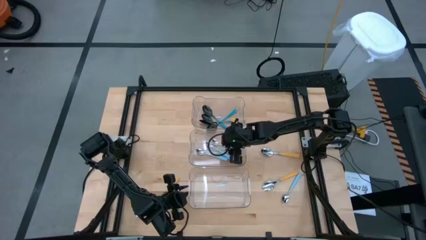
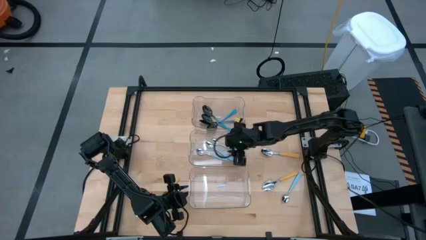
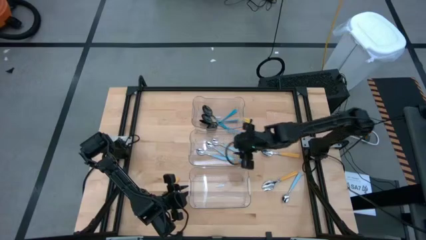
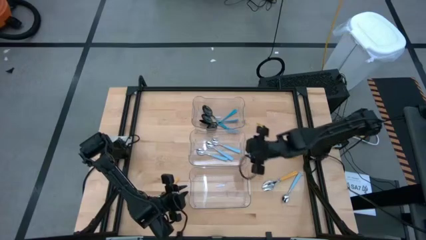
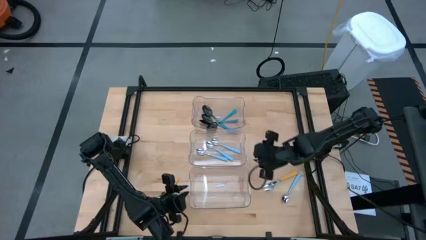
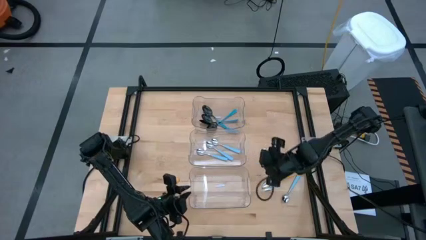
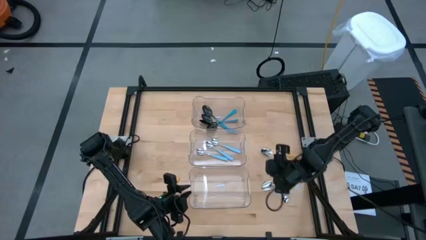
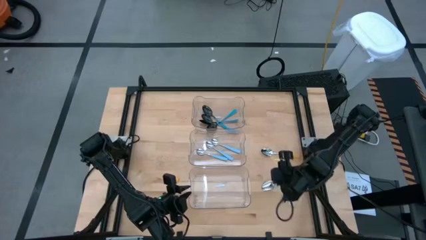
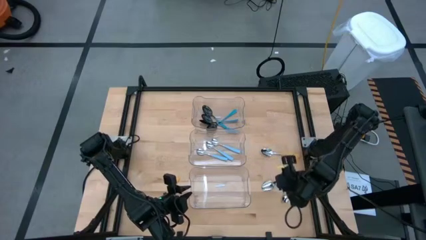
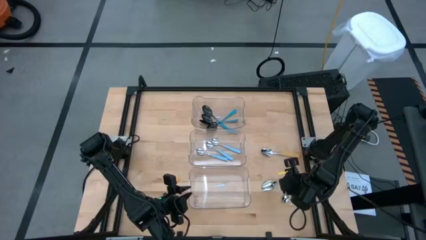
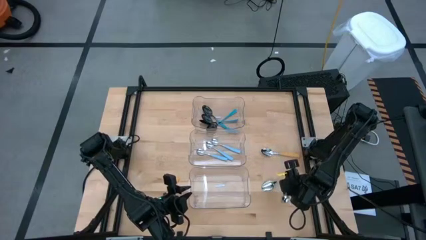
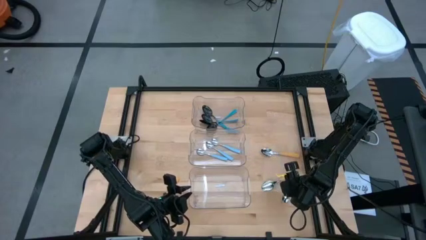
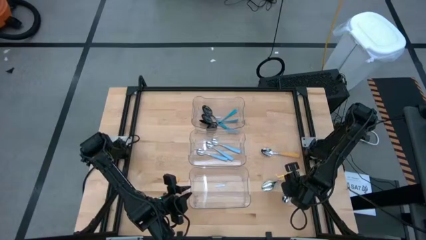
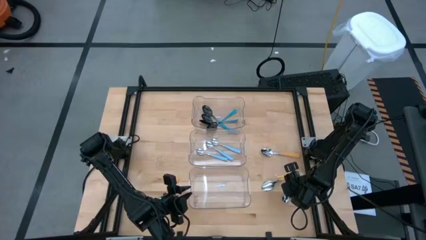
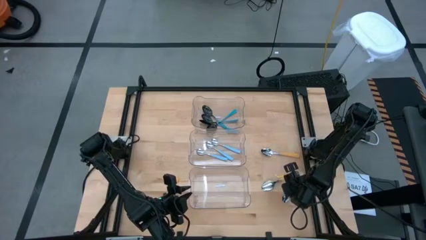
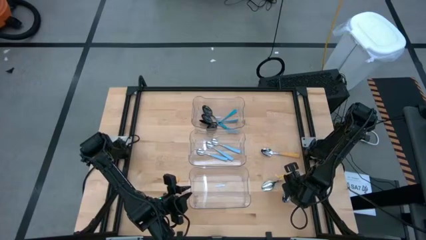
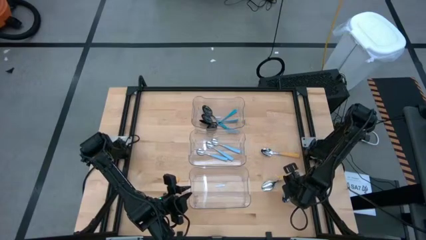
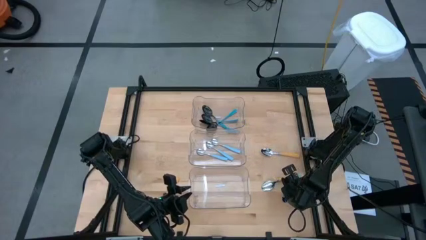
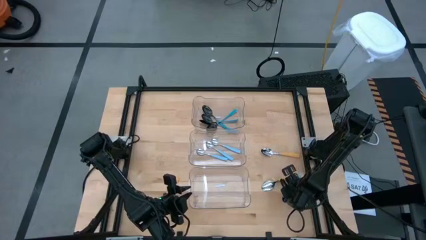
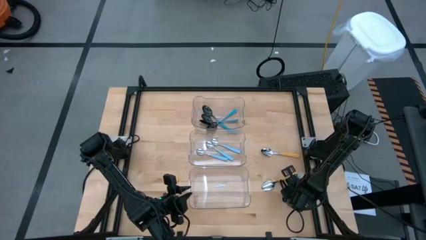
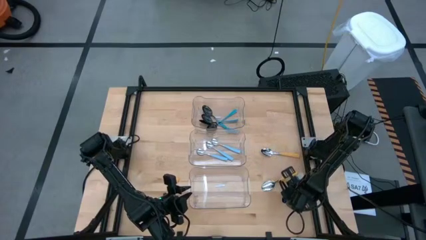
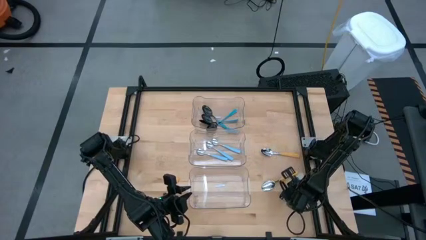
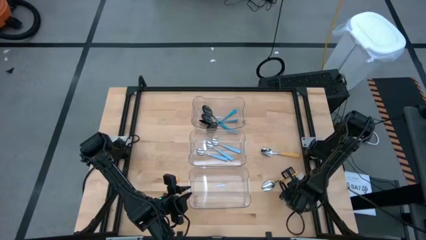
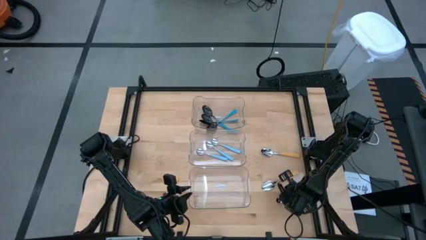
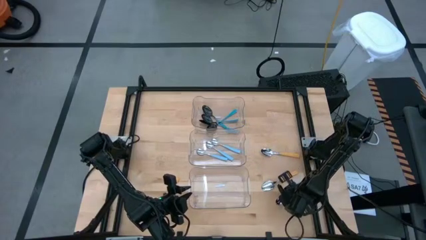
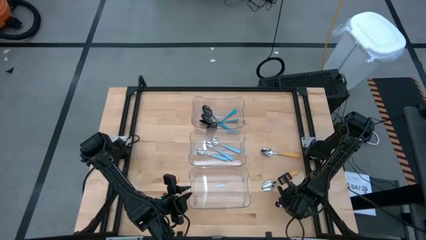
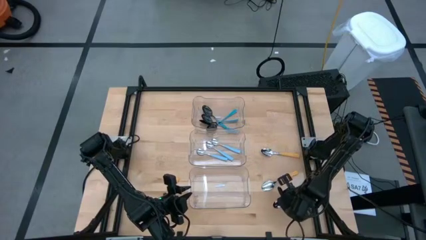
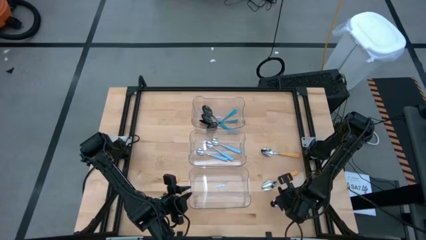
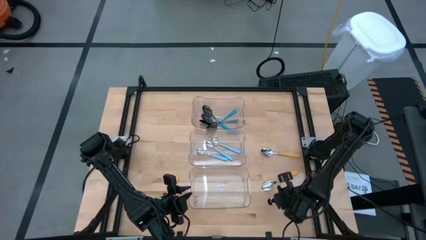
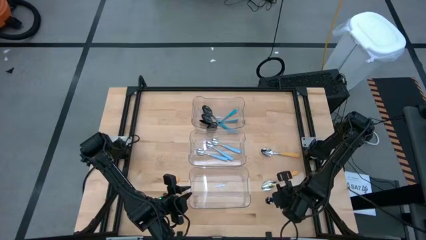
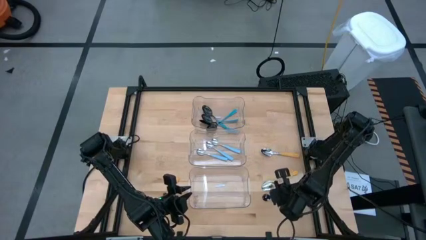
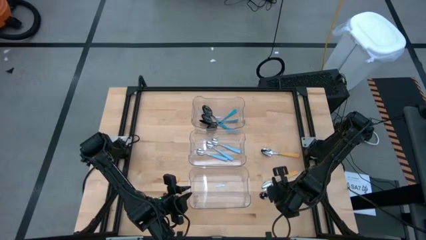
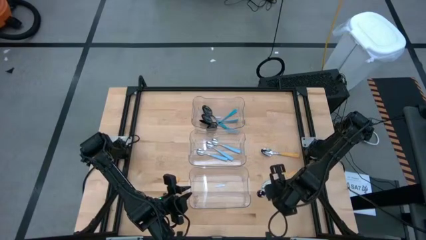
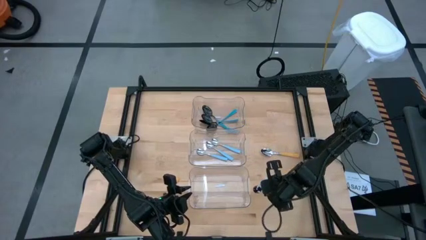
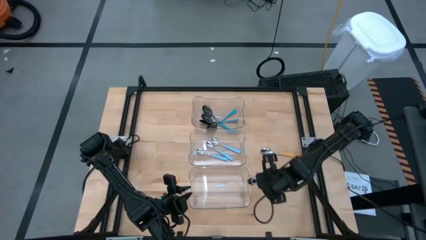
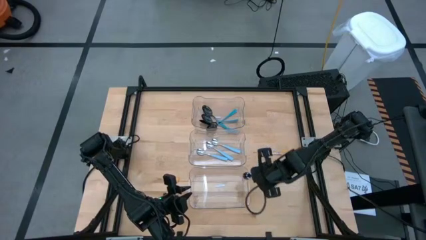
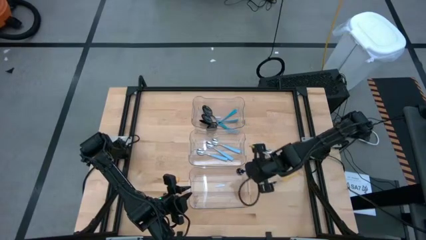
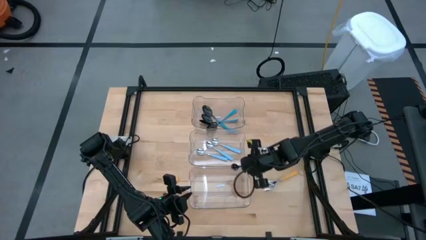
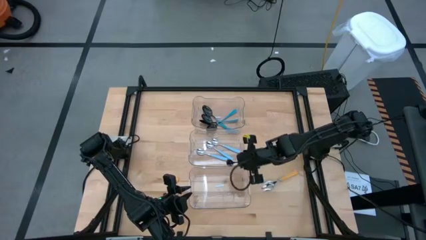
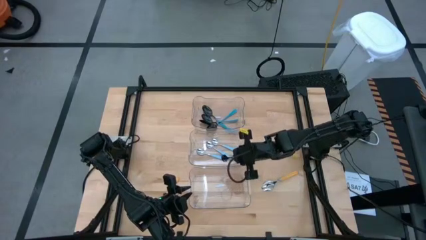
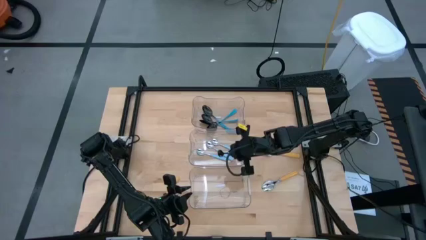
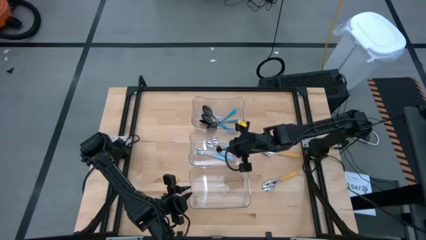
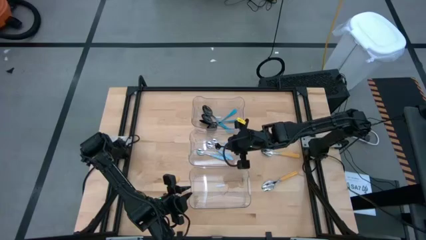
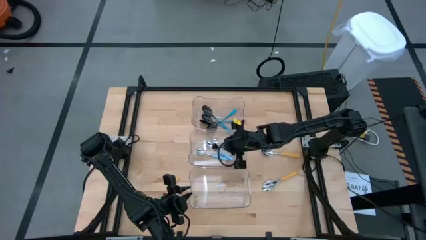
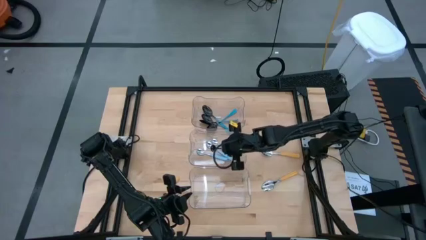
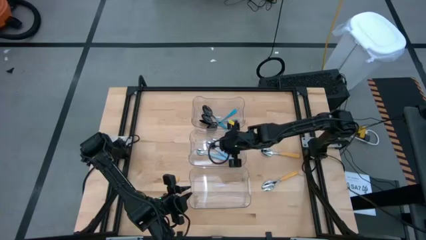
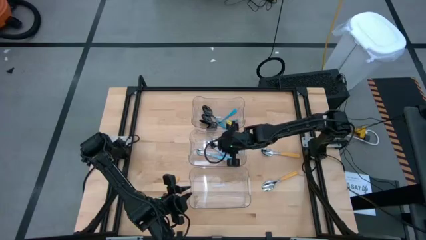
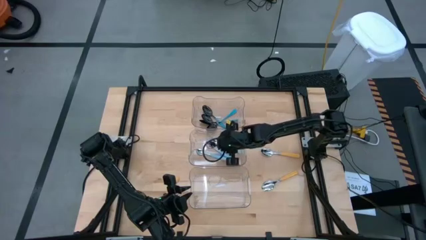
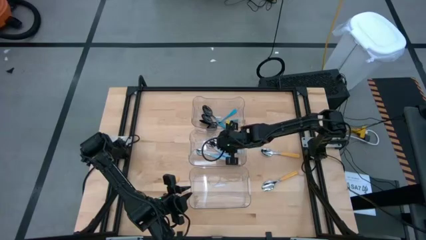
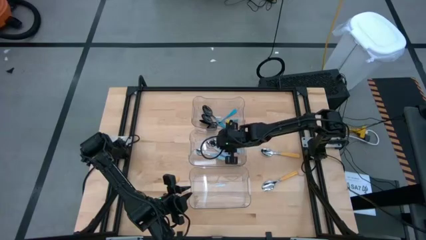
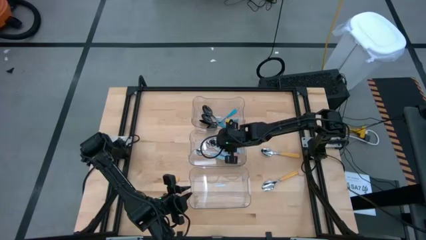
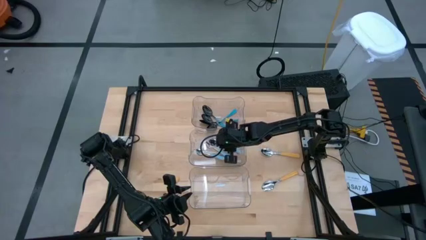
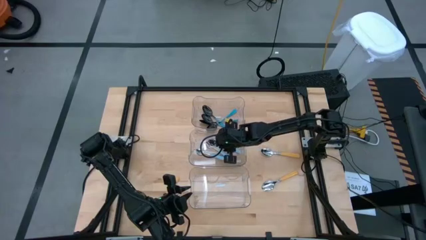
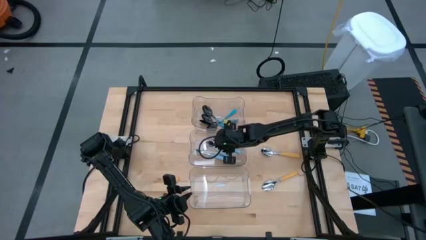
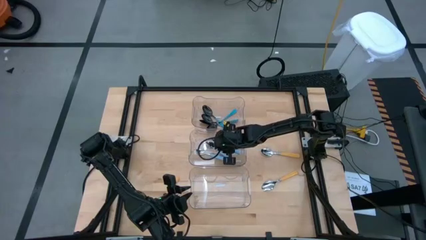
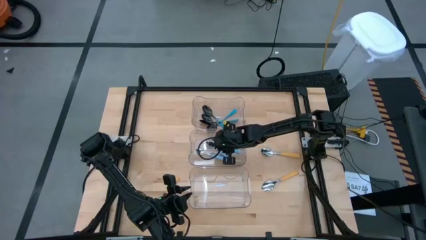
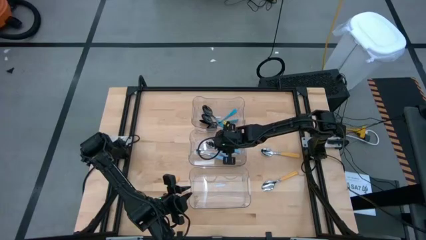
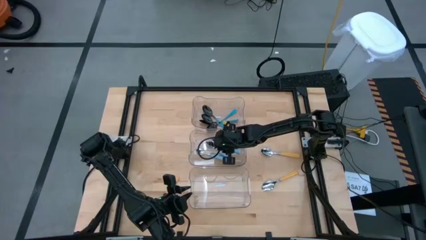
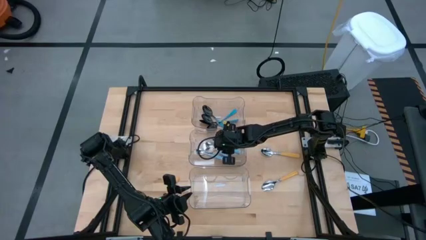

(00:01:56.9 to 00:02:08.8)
Task: Sort silverware by color (type)
Put the light blue spoon into the middle transparent bin

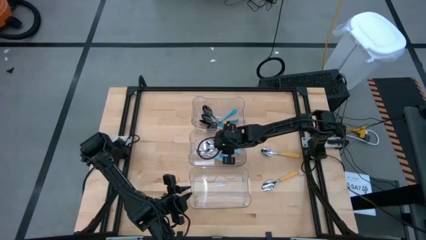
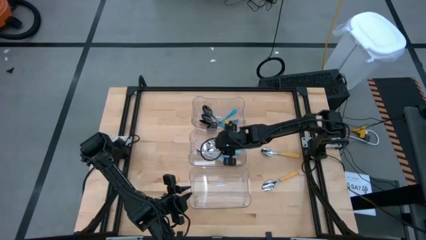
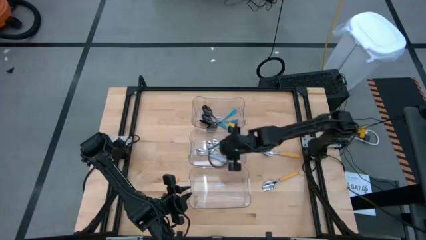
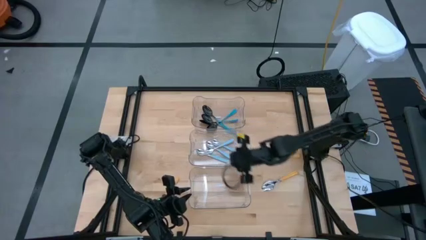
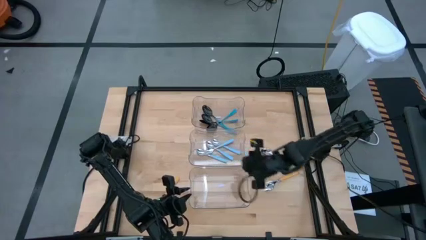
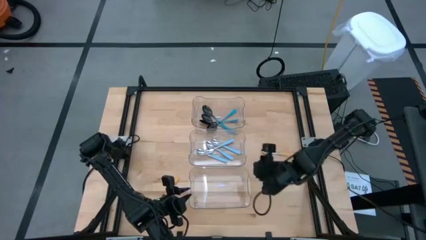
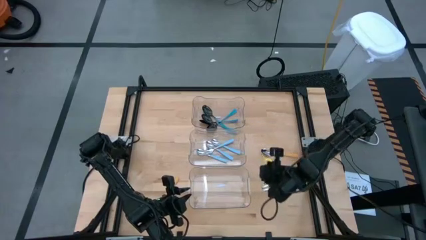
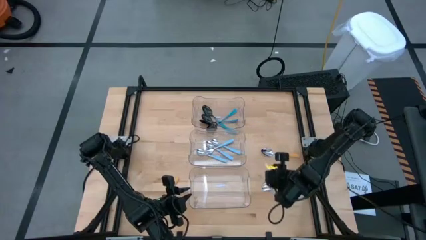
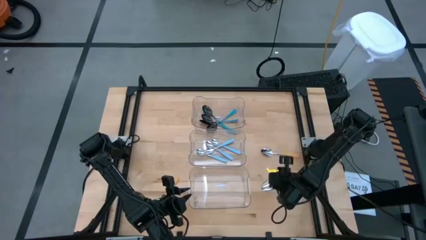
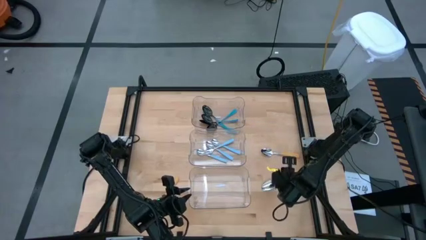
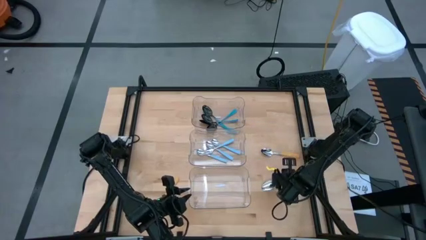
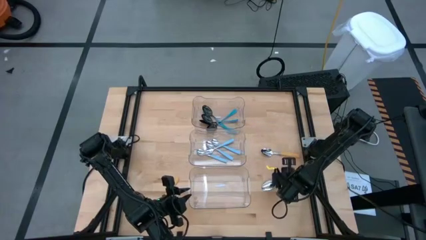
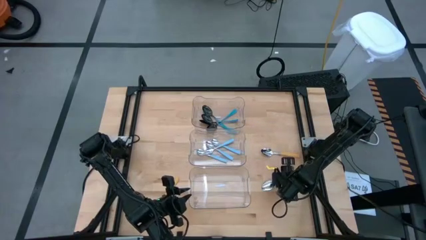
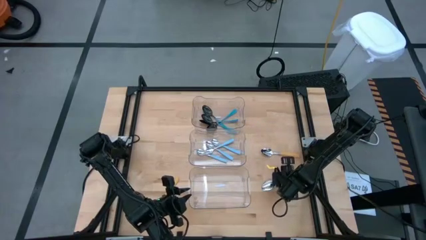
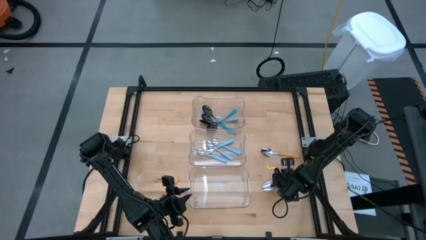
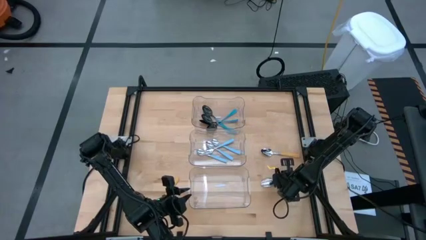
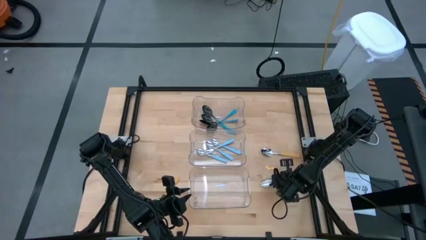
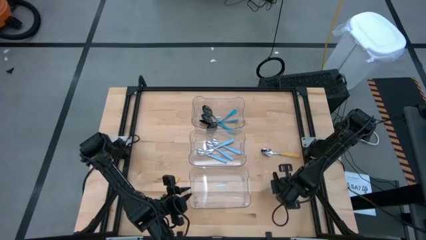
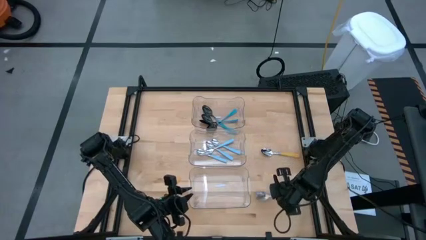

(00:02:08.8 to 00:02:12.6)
Put the yellow spoon into the bottom transparent bin

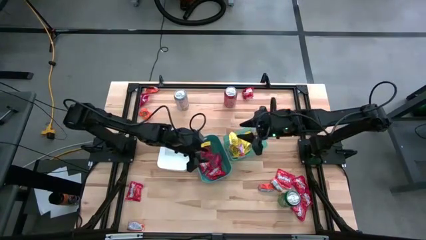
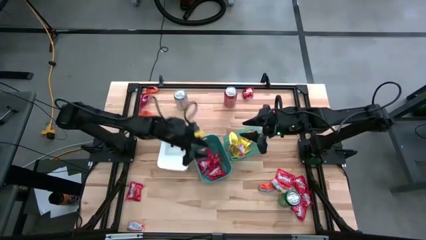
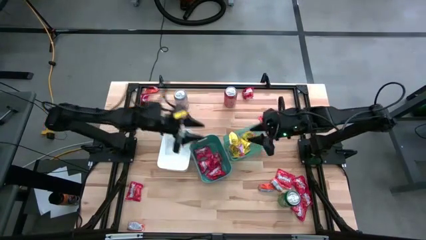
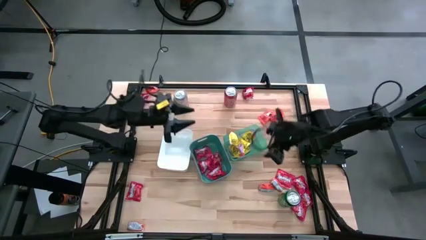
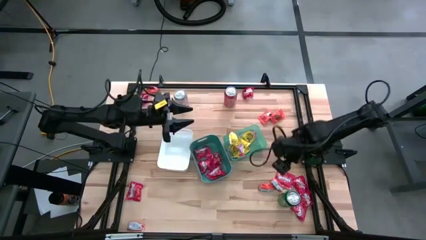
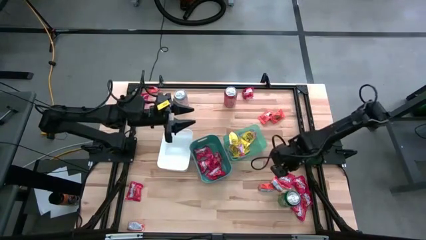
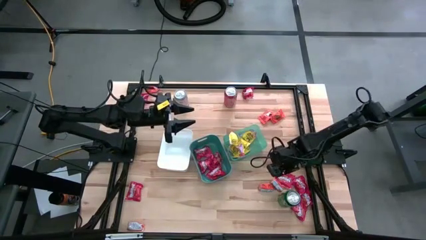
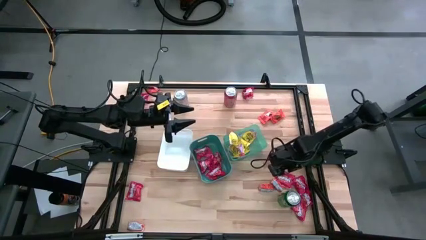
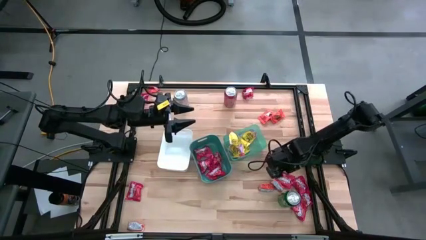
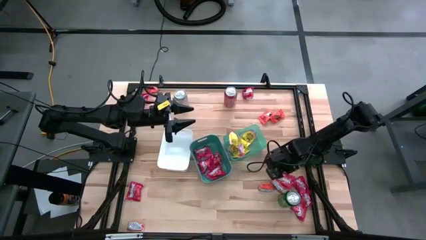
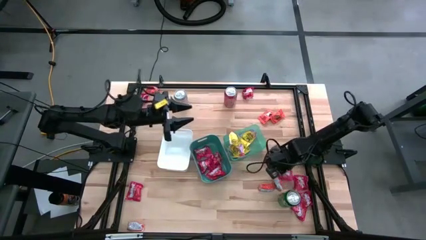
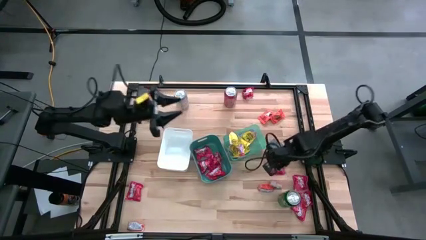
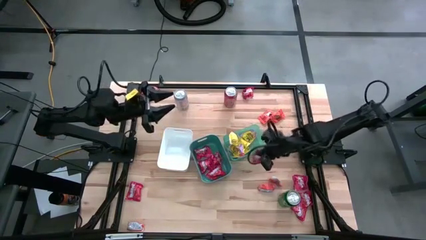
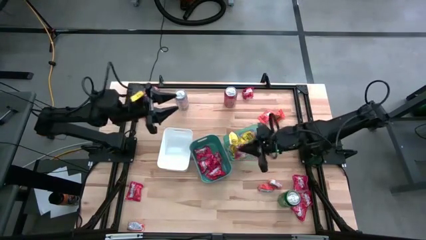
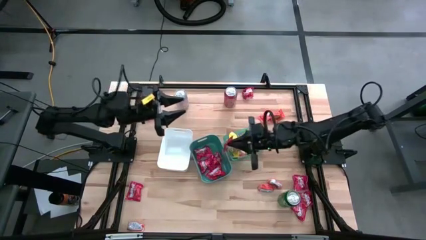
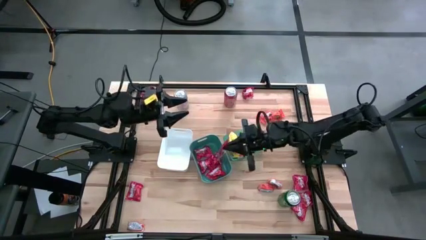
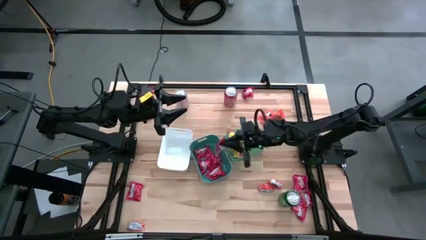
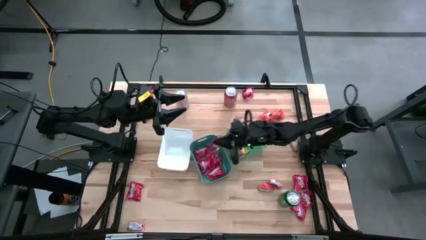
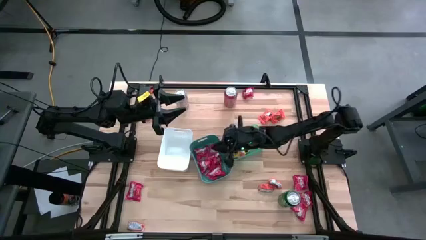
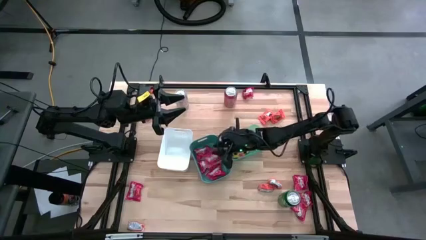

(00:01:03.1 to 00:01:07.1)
Task: Sort candy
Put the red candy into the green bin
